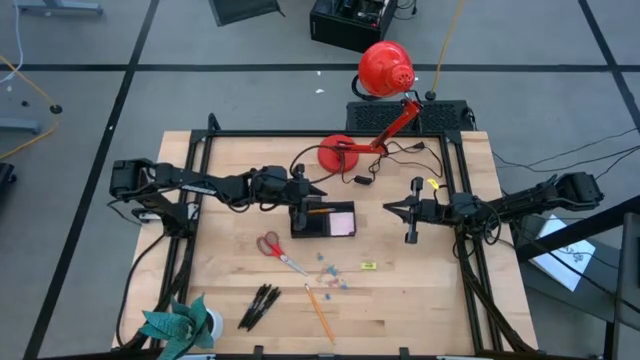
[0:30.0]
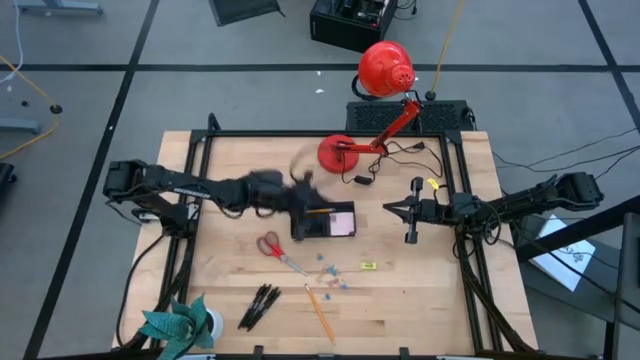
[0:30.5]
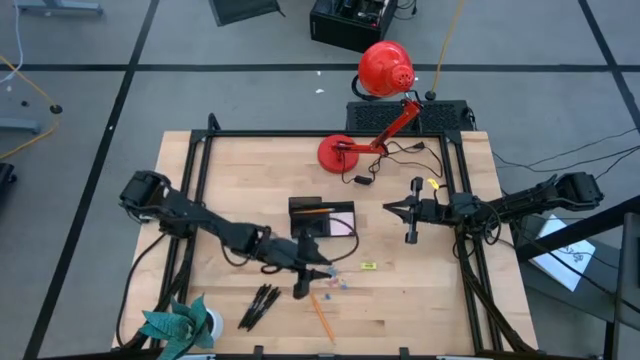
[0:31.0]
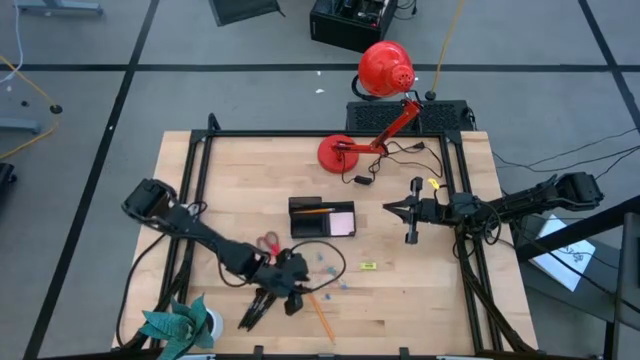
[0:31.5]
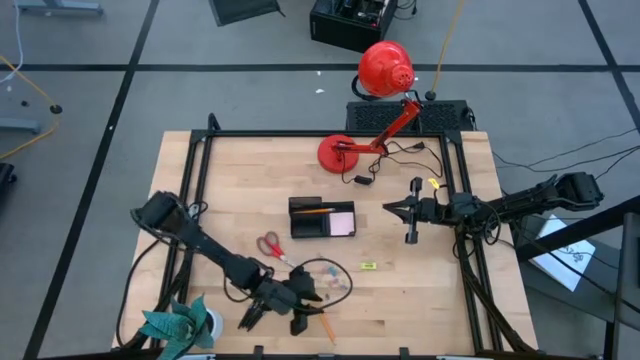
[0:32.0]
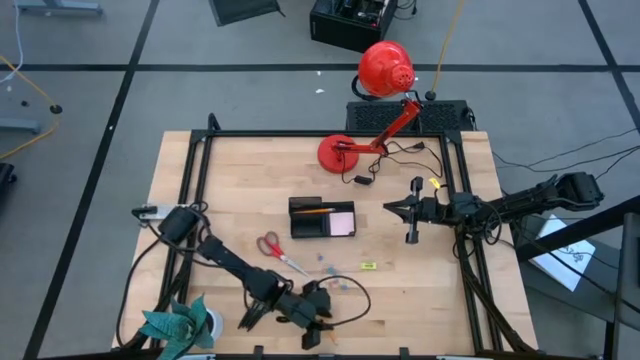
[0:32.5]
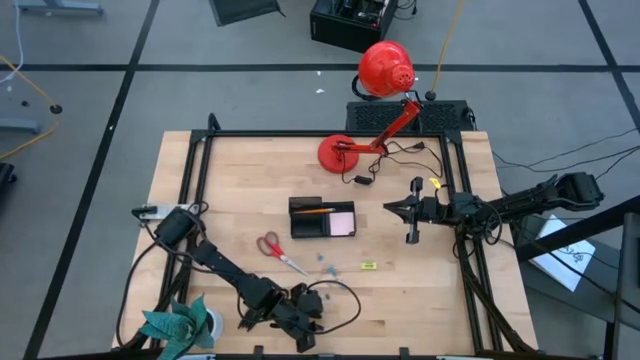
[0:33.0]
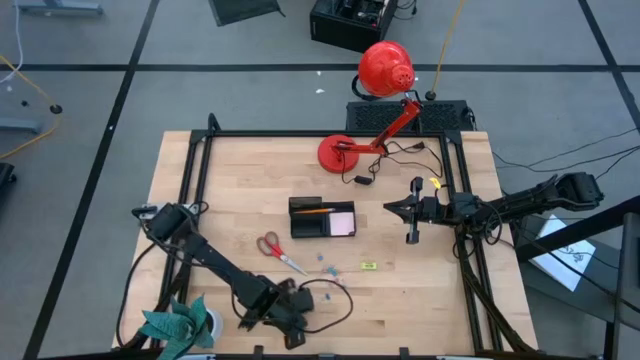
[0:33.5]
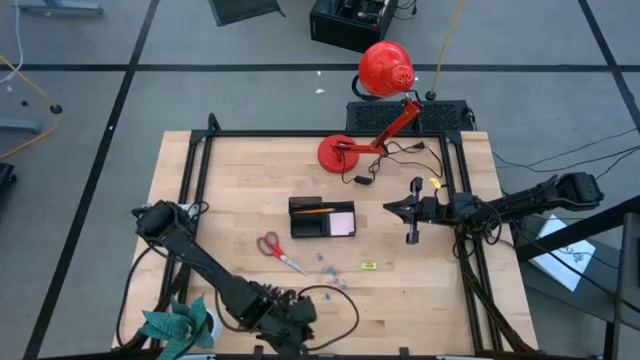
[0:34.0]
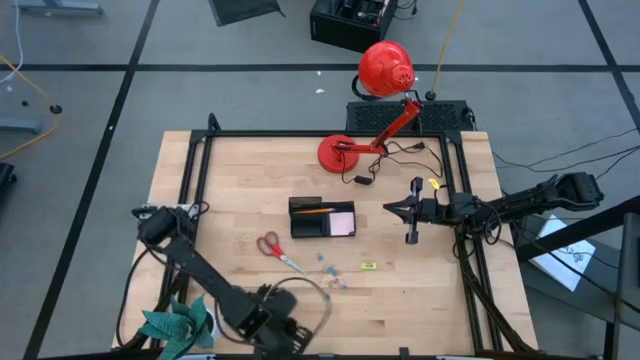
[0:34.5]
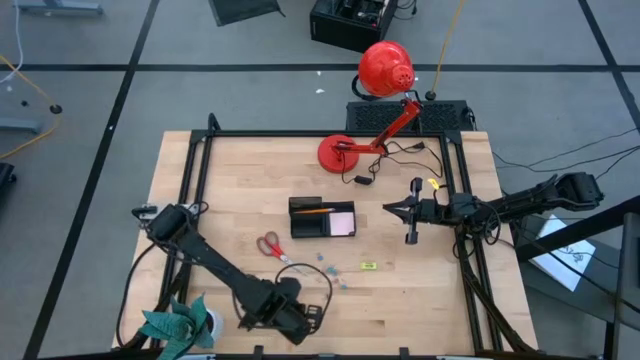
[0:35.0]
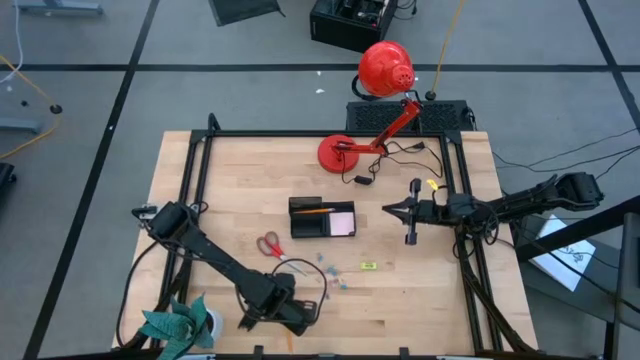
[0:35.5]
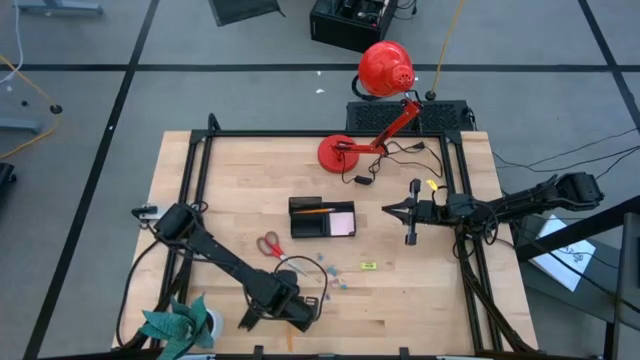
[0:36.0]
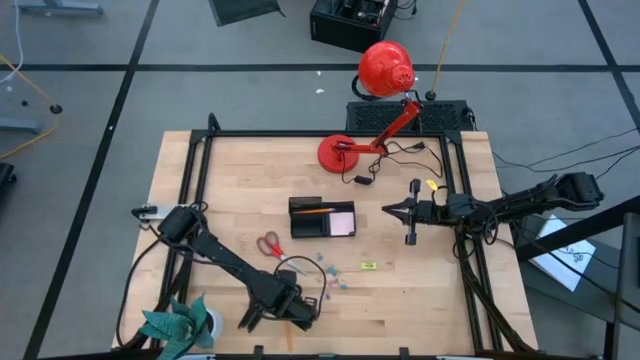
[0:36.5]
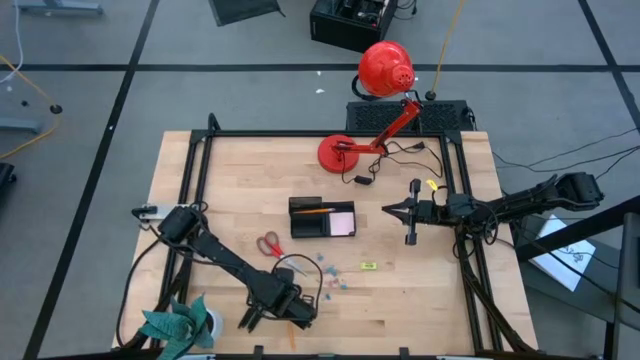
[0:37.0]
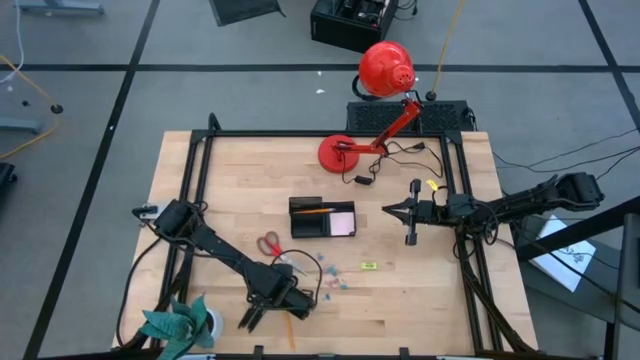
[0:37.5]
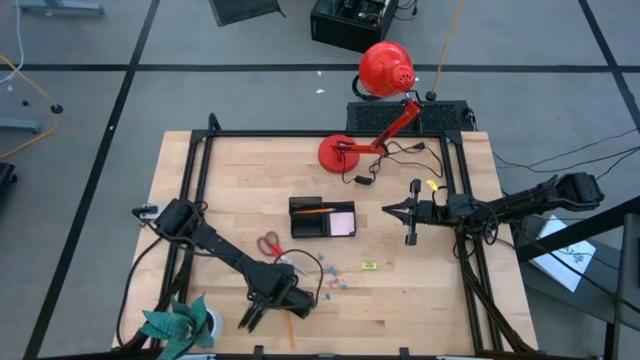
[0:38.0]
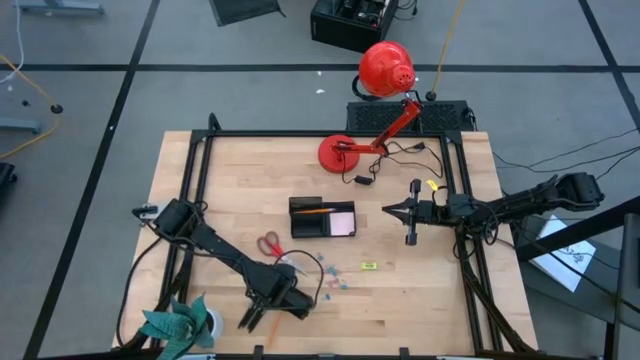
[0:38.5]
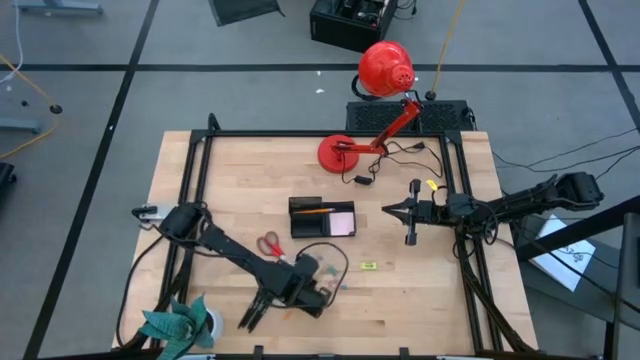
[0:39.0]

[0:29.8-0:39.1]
Task: Pick and place office supplies into organizer
Put the pencil into the mesh desk organizer

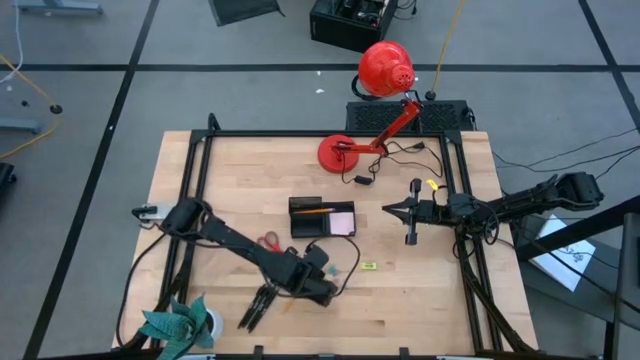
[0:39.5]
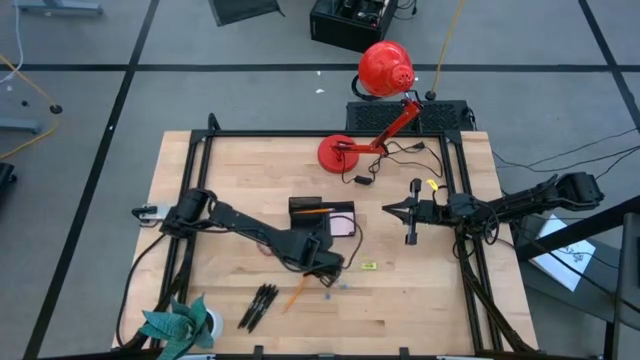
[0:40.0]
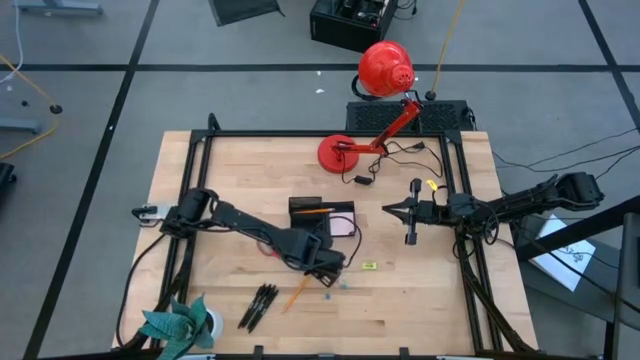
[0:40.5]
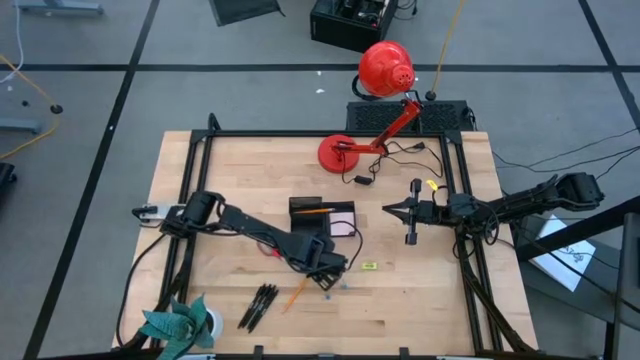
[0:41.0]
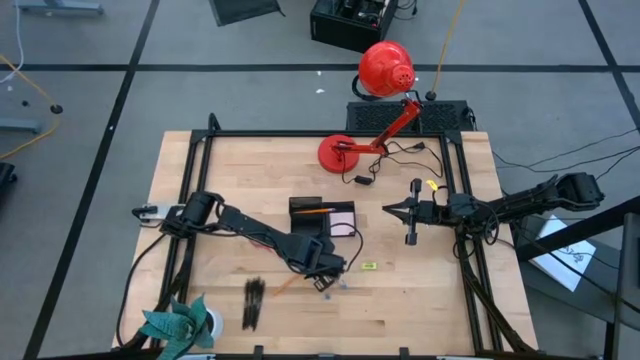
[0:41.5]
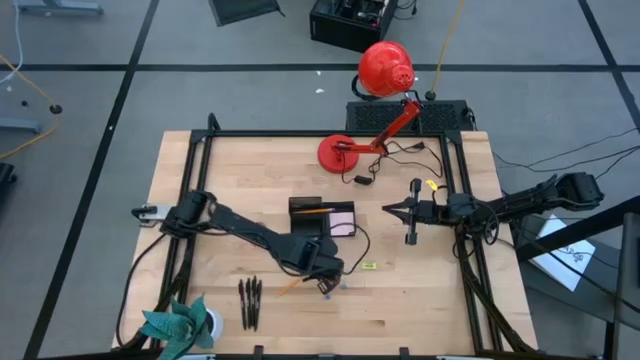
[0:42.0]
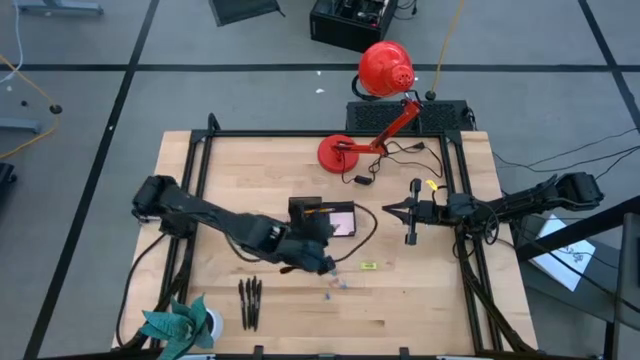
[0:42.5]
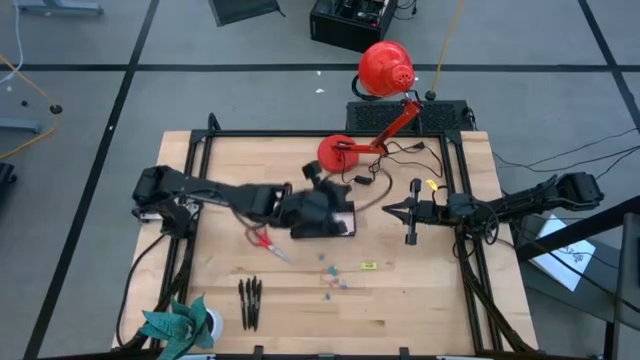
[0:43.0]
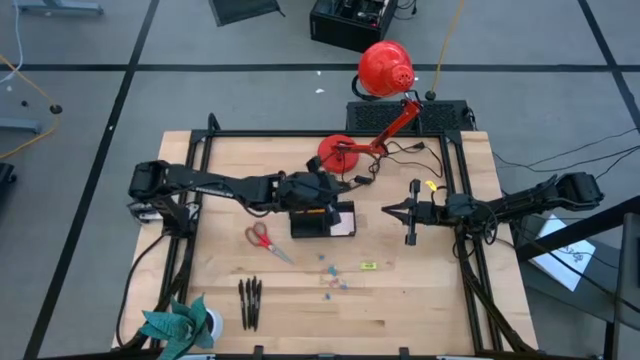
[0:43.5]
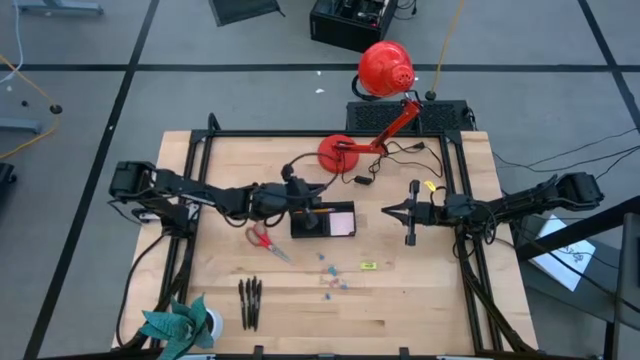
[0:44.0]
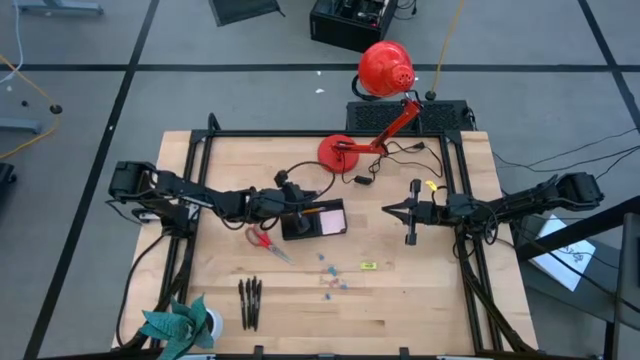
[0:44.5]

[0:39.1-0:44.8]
Put the pencil into the mesh desk organizer

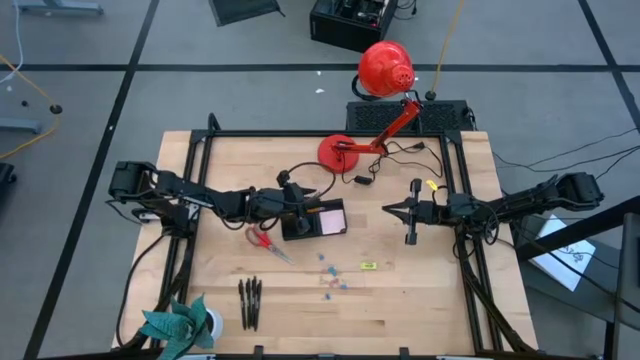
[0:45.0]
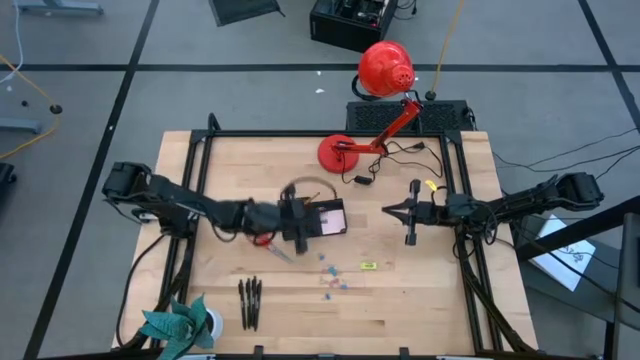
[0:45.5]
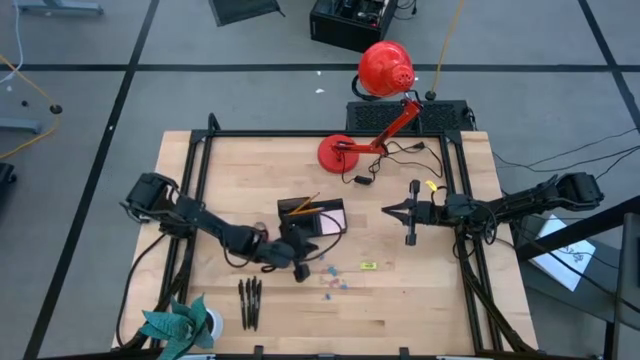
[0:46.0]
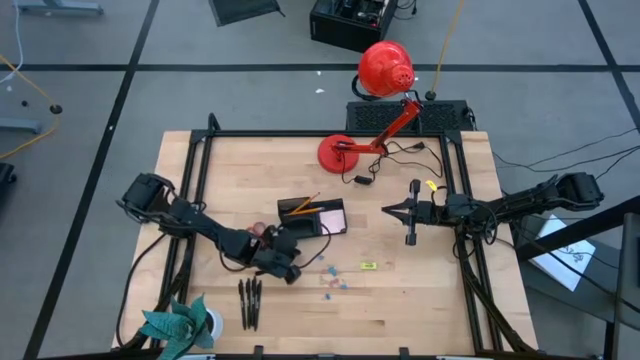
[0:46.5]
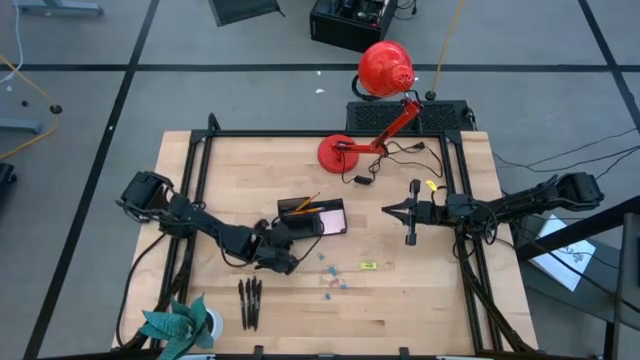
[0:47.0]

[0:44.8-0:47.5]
Adjust the mesh desk organizer

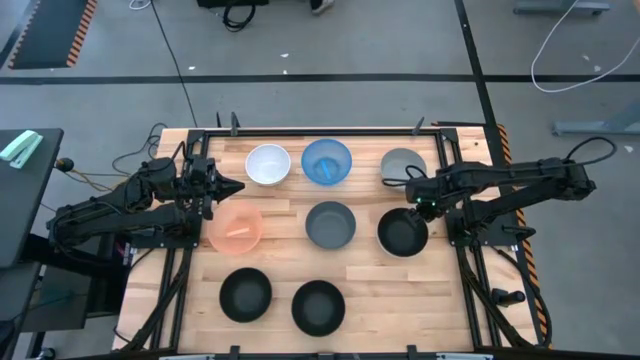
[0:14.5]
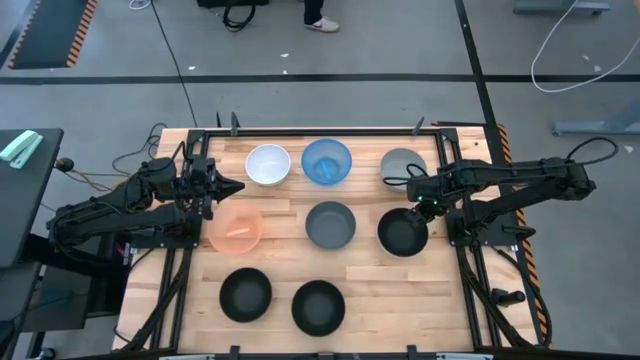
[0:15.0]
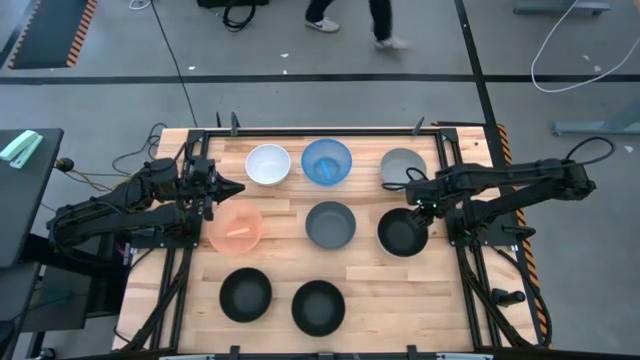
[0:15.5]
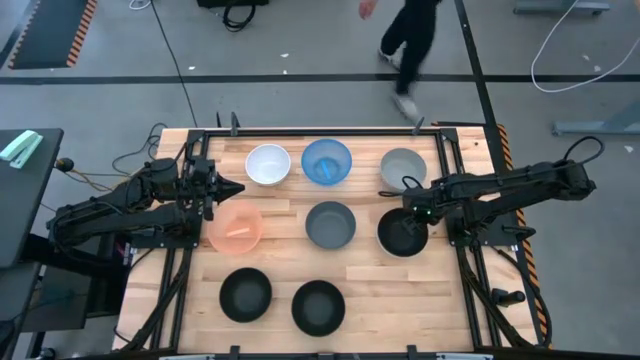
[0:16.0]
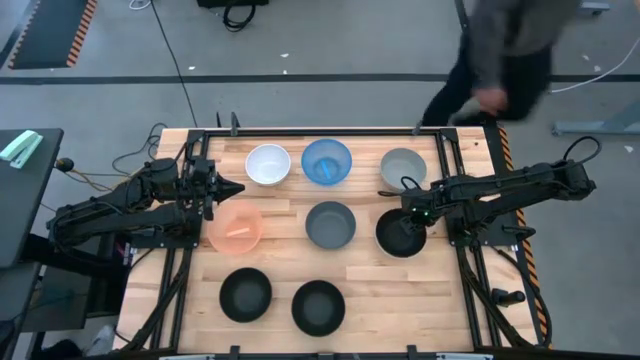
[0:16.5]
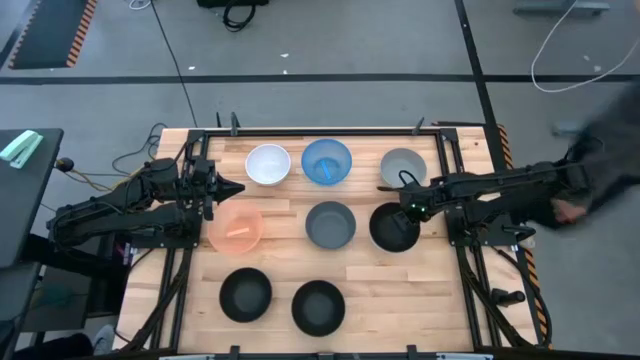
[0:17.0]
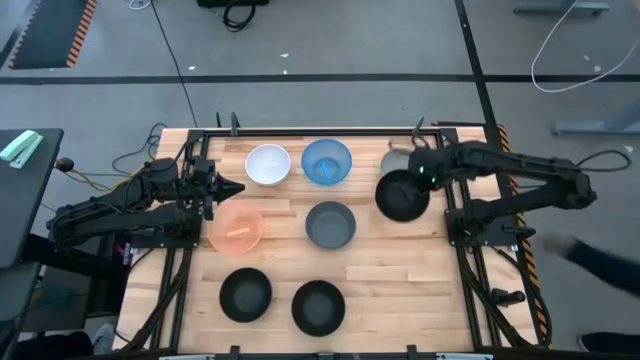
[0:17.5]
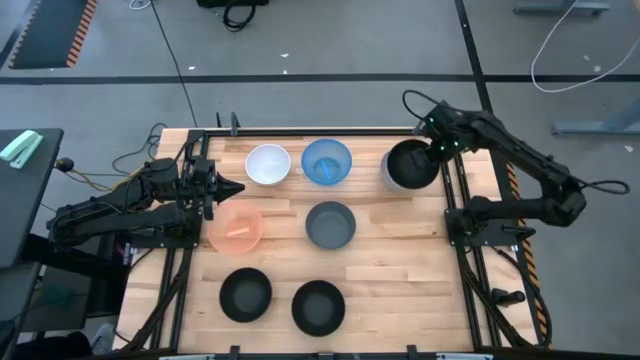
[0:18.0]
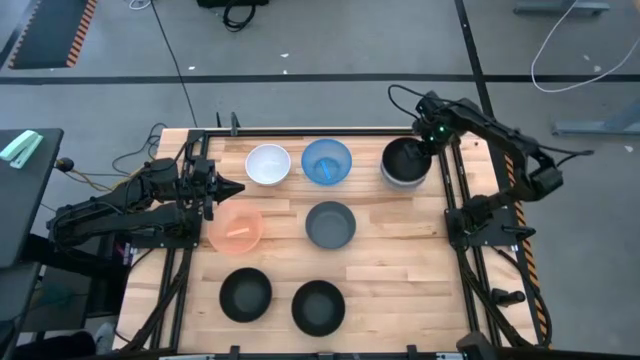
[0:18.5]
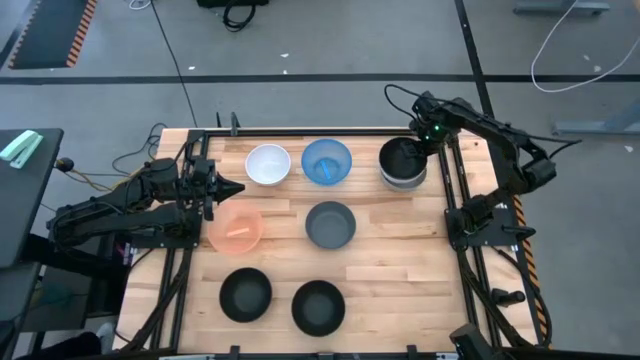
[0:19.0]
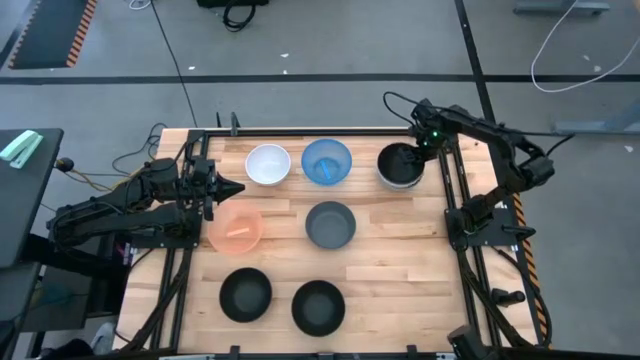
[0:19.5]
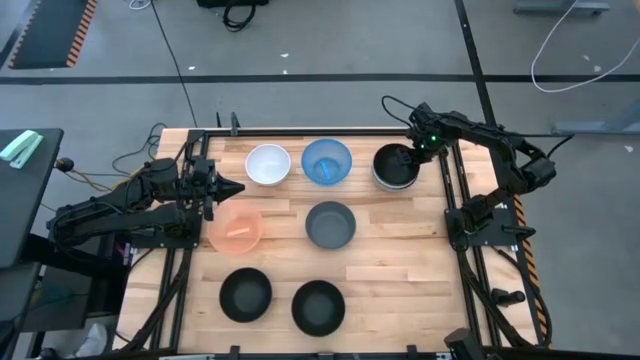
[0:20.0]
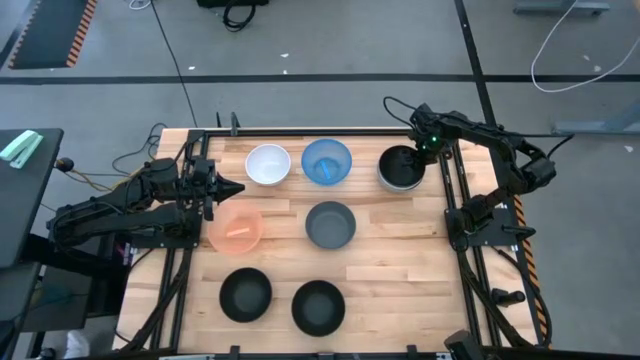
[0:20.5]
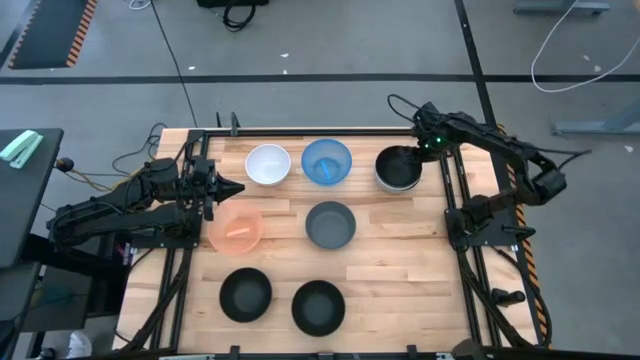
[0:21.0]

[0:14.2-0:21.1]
Task: Nest bowls inside each other
Stack the stacked bowls on top of the top gray bowl
